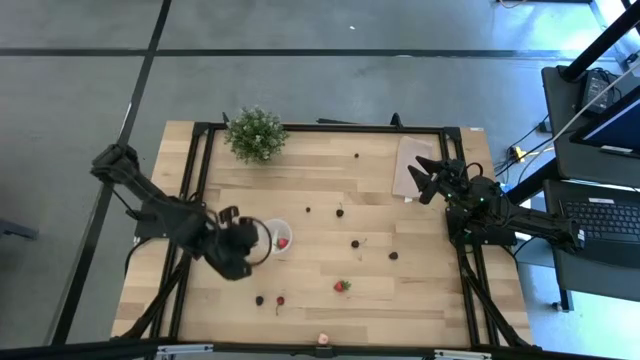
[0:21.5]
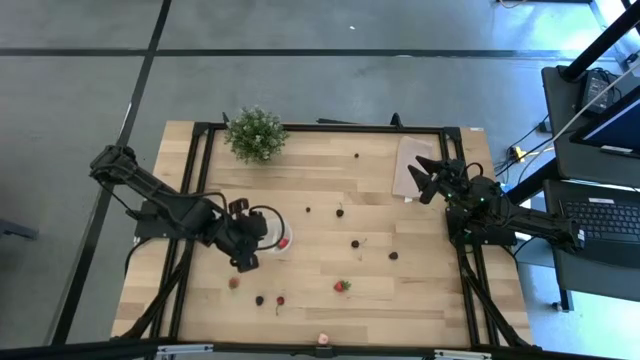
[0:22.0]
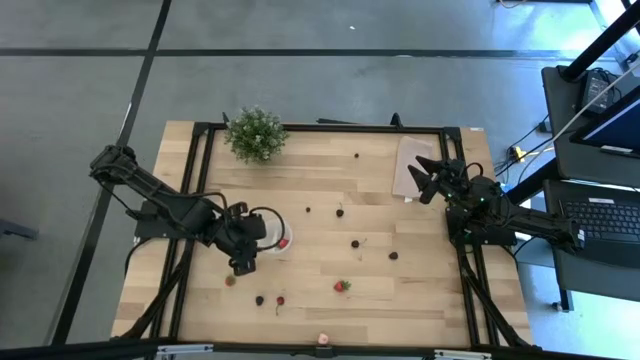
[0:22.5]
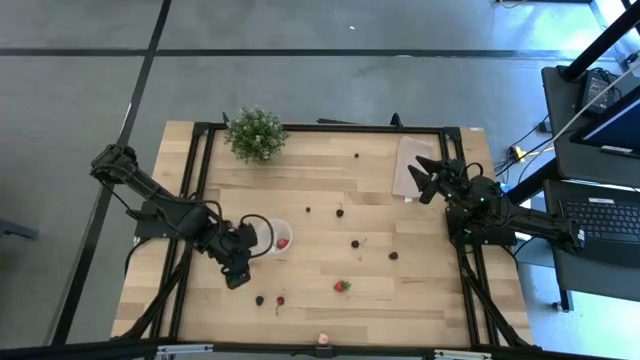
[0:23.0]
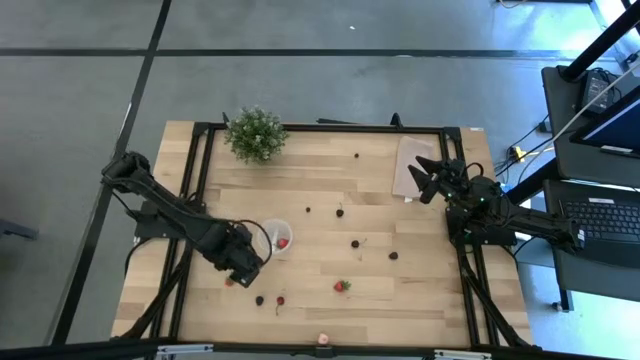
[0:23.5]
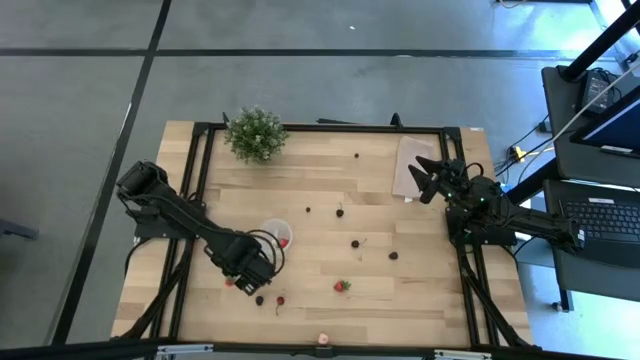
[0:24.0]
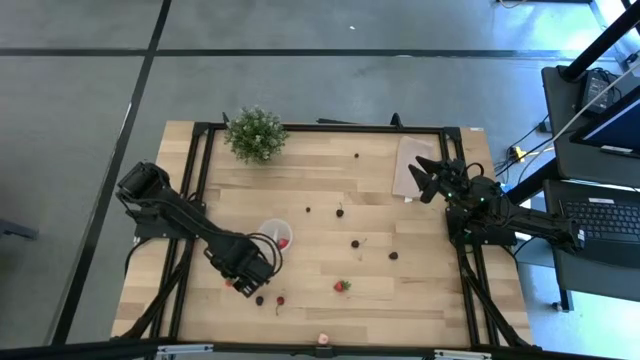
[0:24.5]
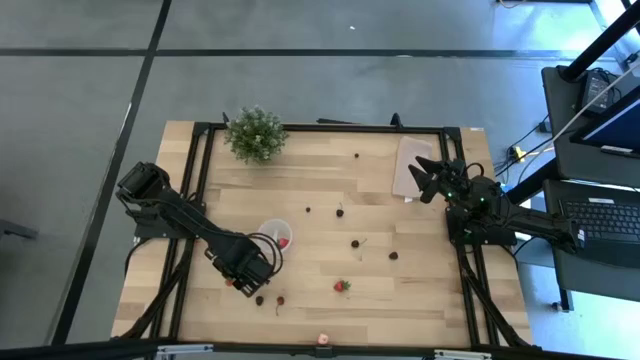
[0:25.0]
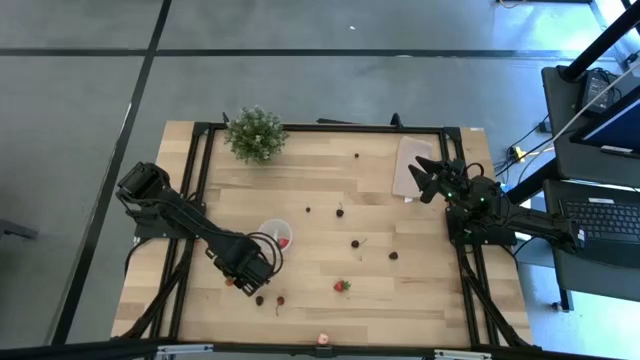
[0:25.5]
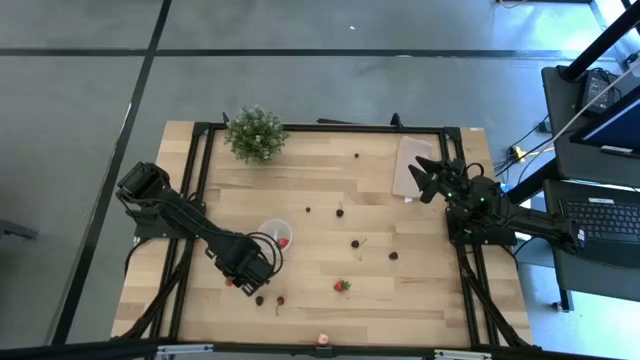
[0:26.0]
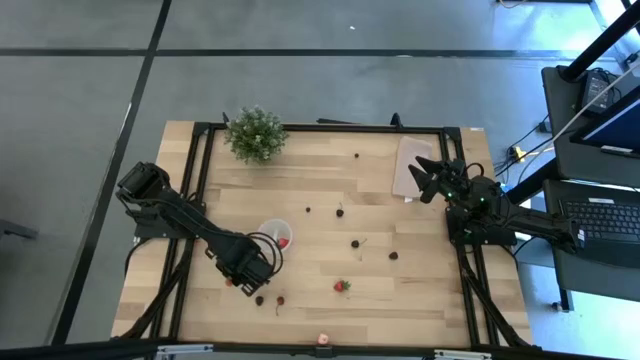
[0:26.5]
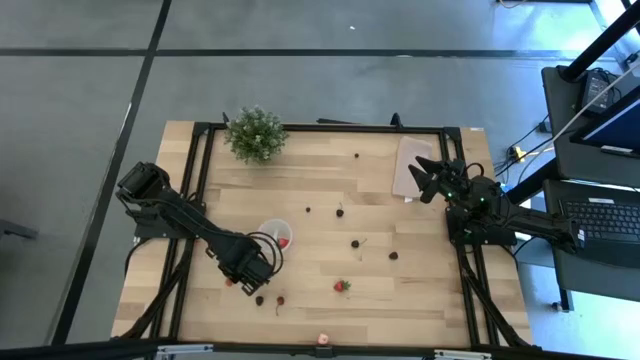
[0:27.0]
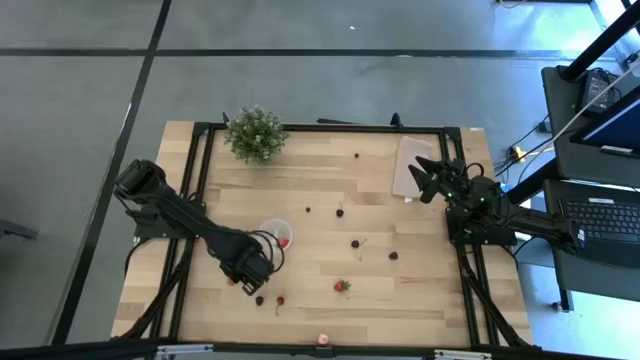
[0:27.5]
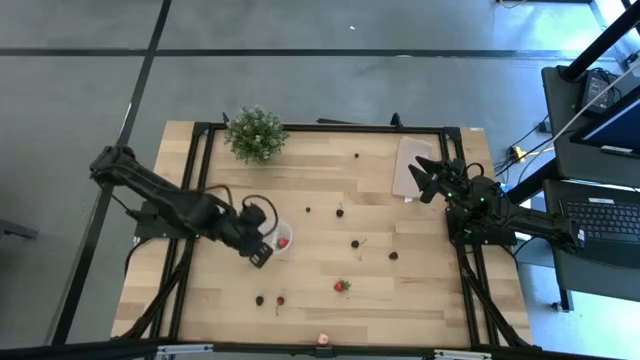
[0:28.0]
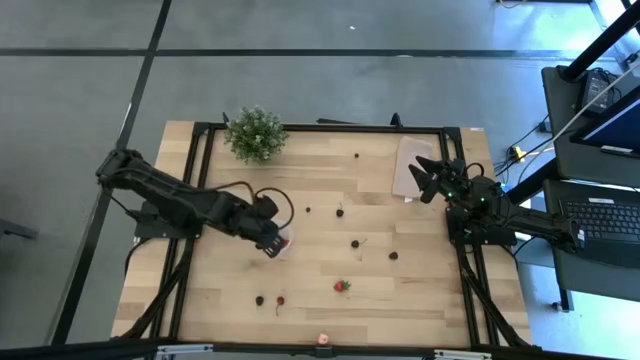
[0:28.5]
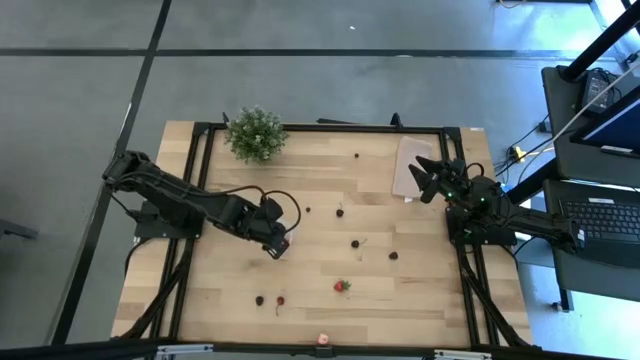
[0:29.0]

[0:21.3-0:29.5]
Task: Pick and placing Produce into tupperware
Put the red strawberry into the container

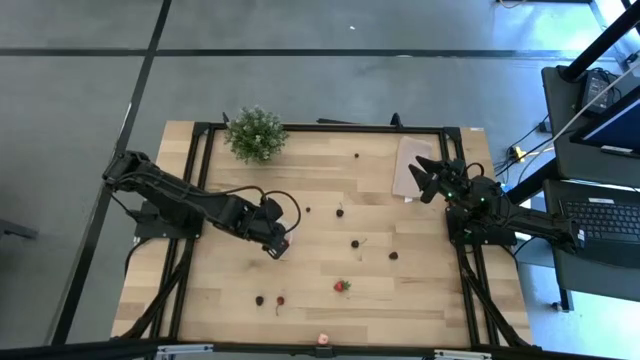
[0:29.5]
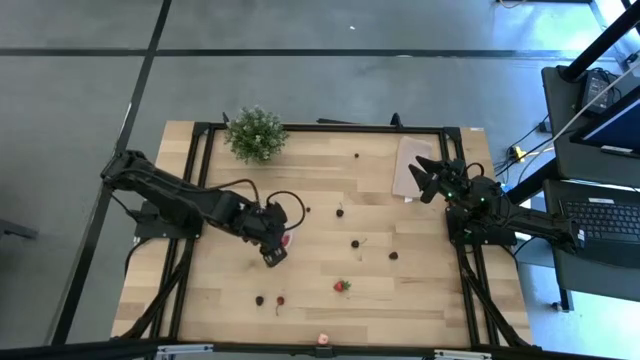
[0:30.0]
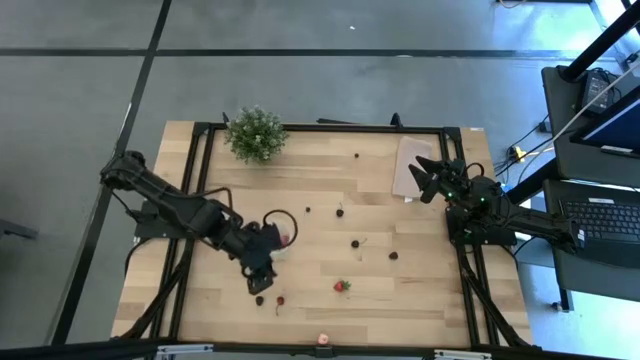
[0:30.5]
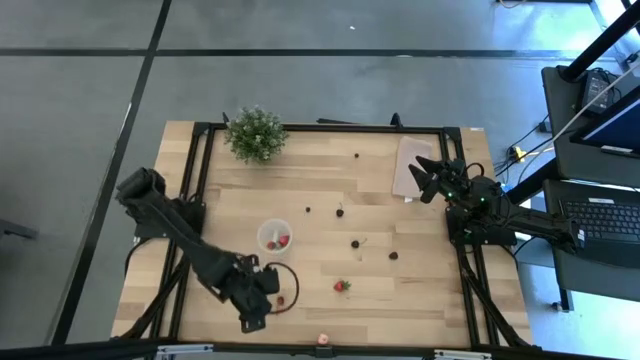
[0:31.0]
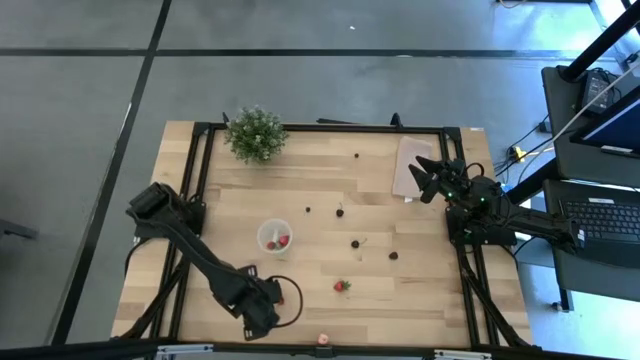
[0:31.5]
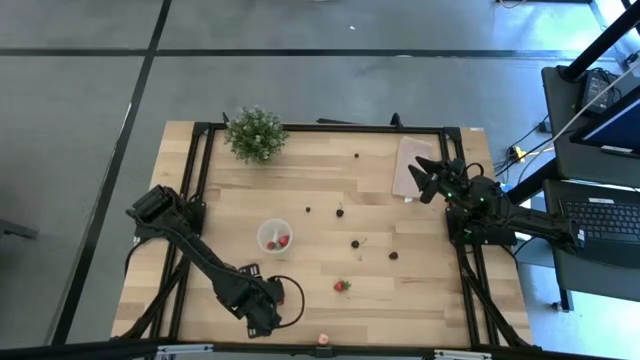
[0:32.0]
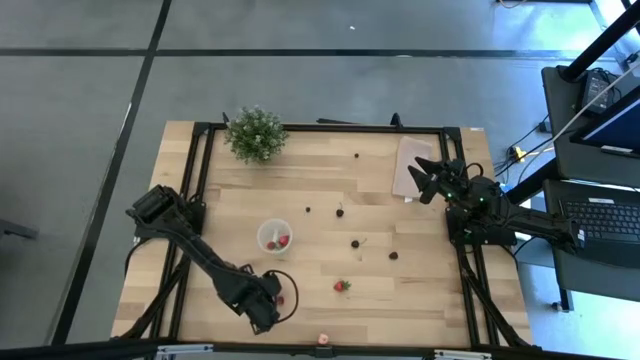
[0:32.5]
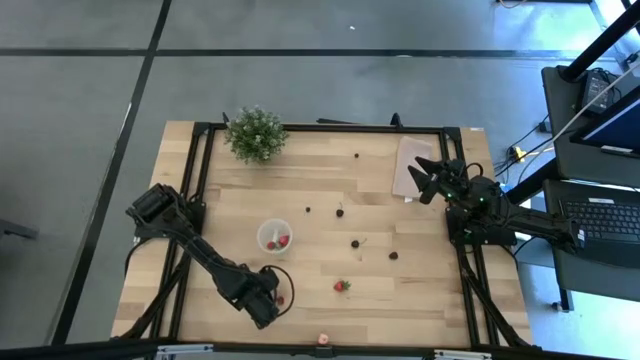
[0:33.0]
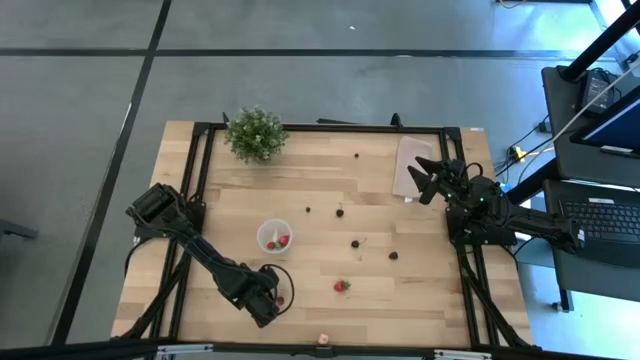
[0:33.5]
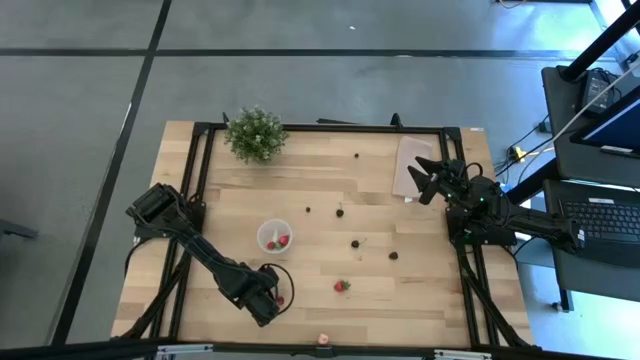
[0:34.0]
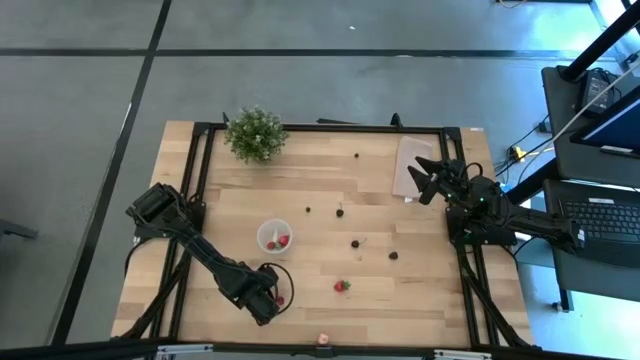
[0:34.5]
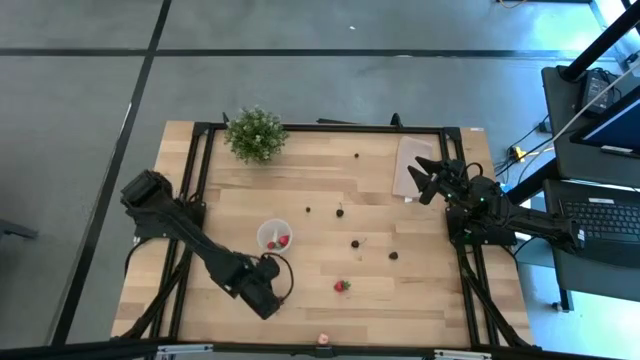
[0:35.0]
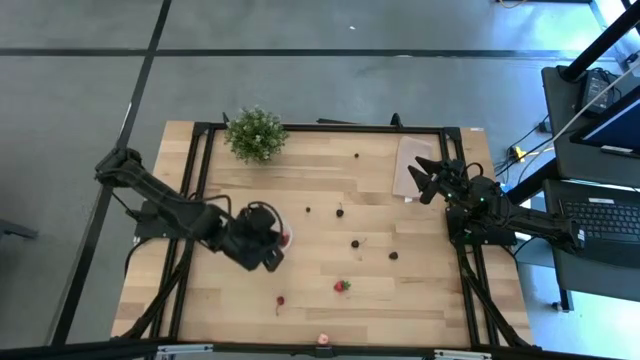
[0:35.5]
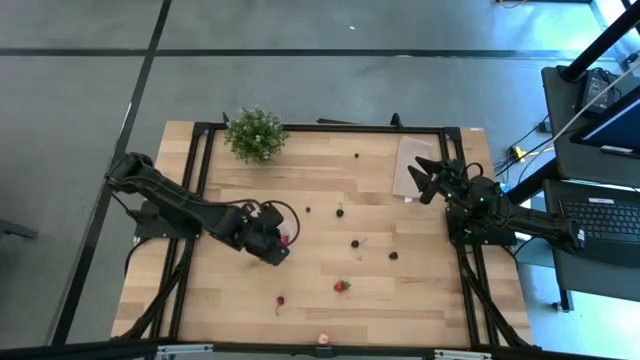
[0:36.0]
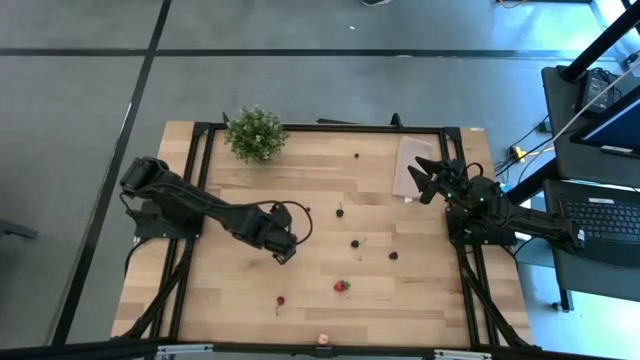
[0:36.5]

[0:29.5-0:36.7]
Put the blackberry into the container

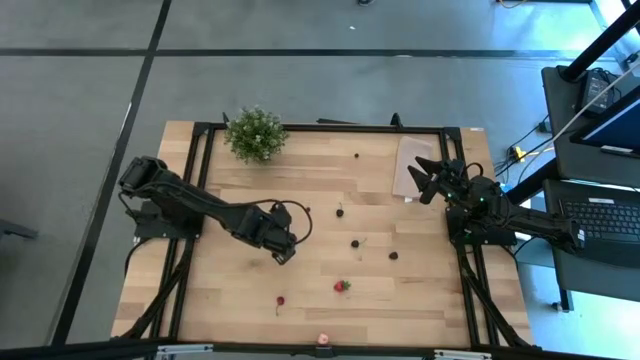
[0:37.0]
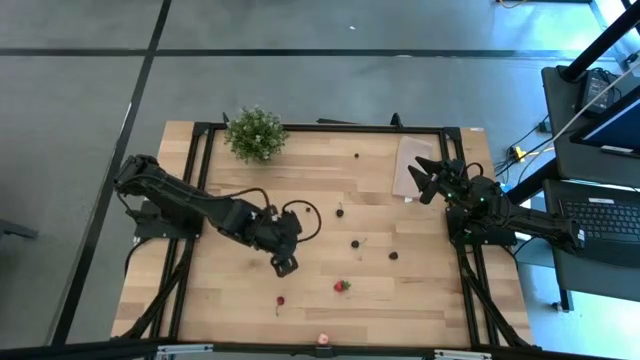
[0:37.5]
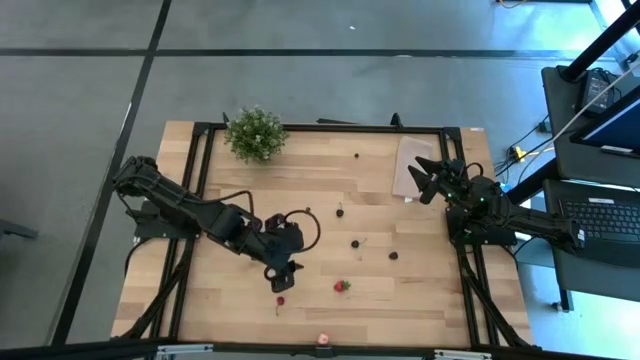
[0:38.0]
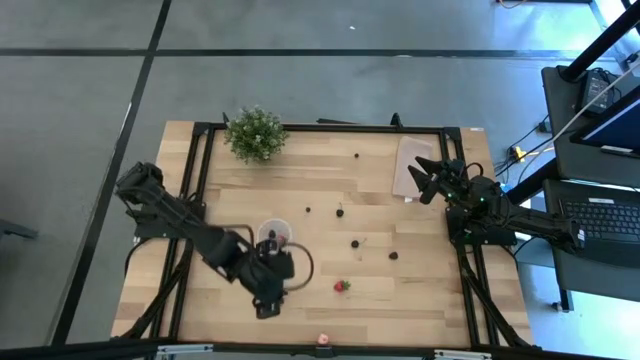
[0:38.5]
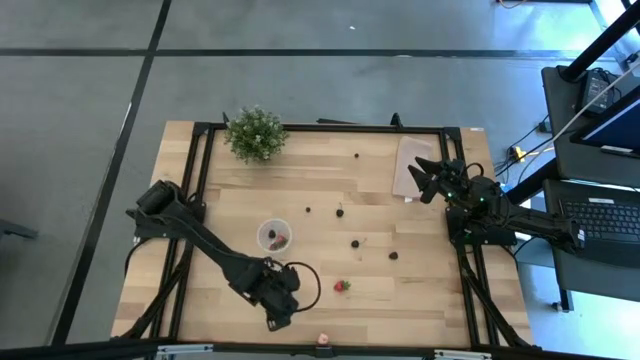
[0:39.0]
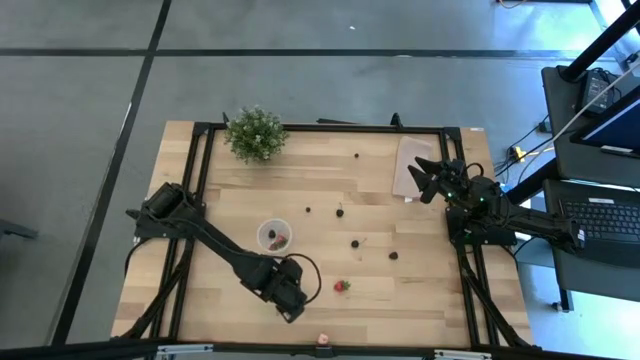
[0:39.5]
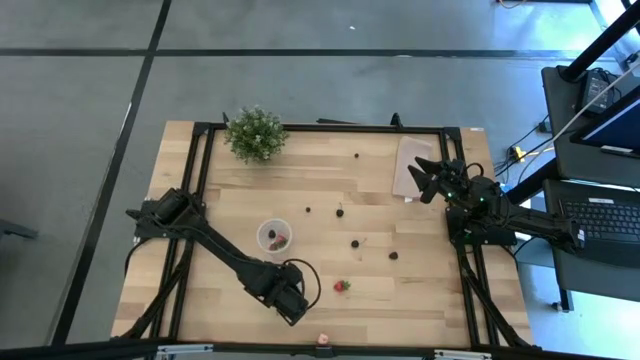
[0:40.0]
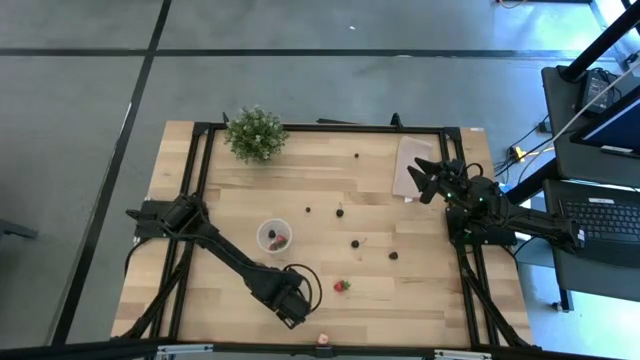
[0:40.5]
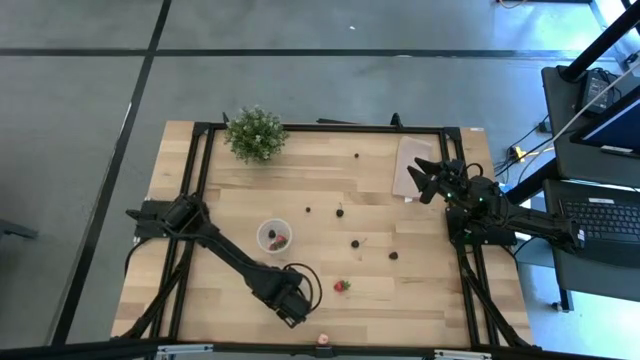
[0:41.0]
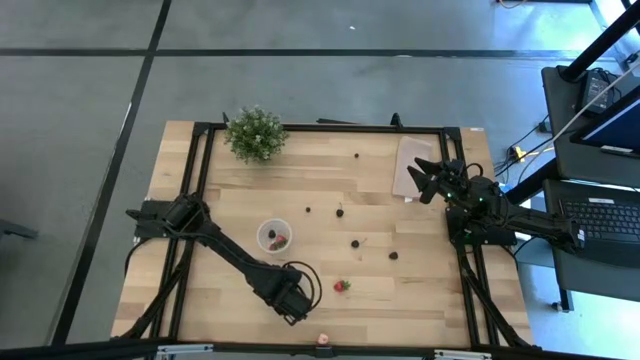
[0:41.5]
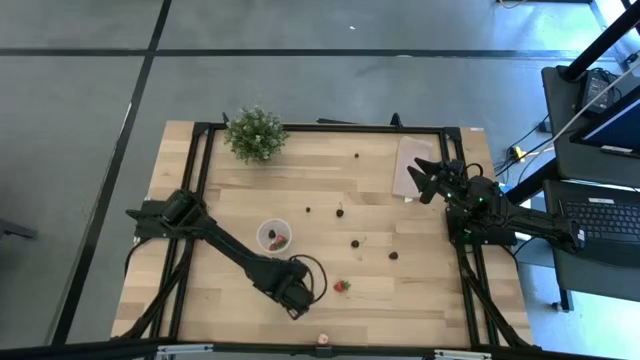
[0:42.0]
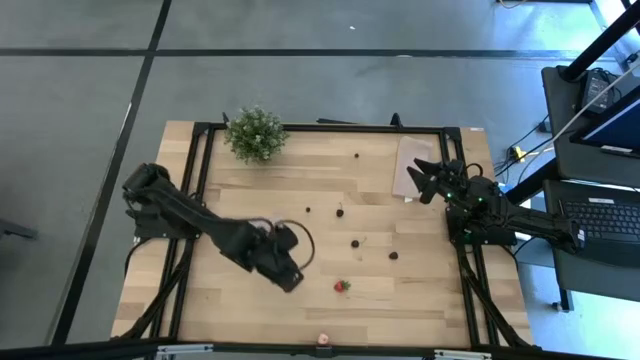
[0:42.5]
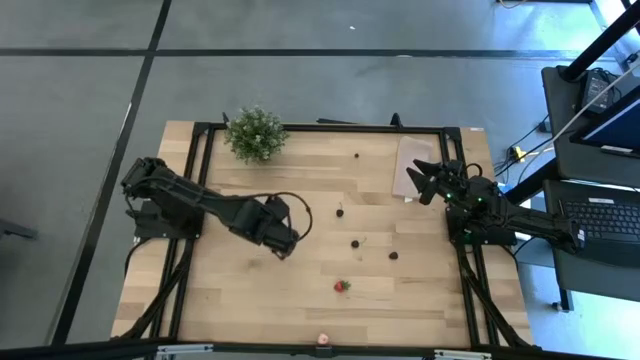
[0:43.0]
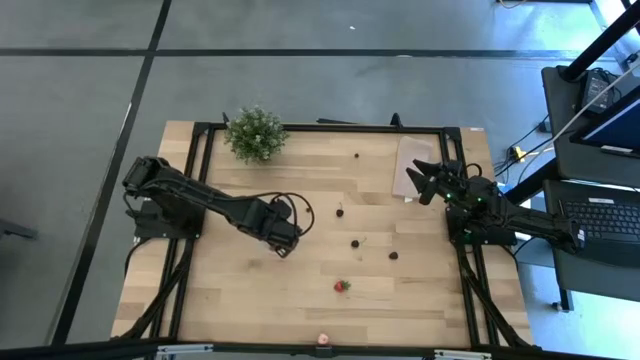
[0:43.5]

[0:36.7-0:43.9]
Put the red cherry into the container
